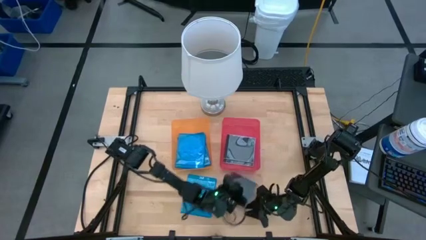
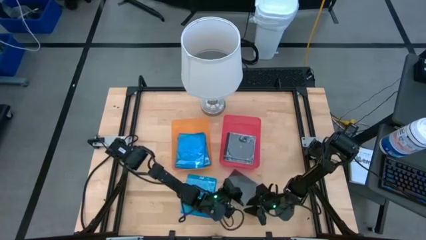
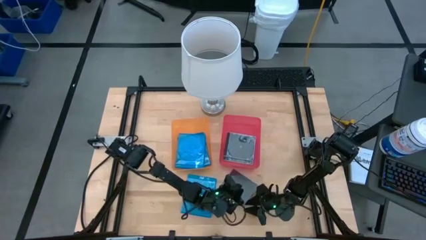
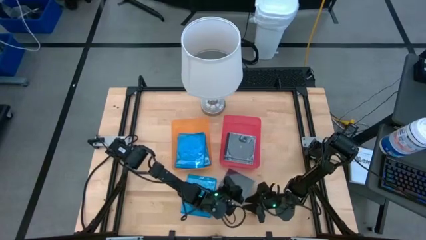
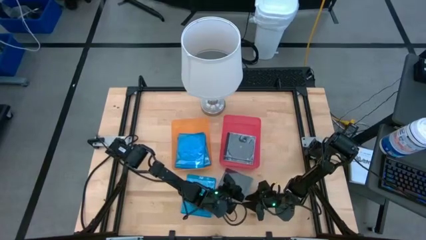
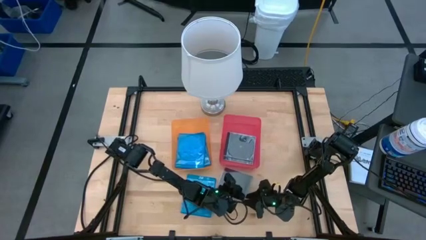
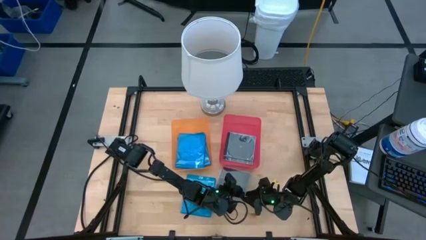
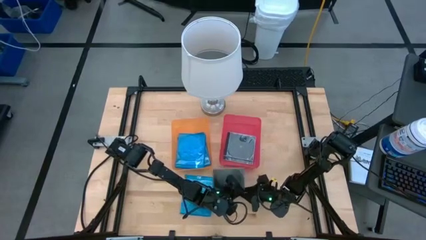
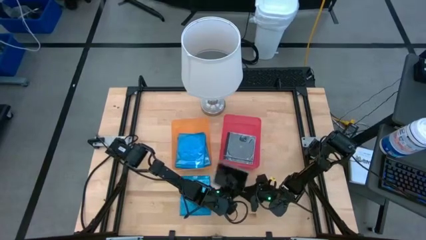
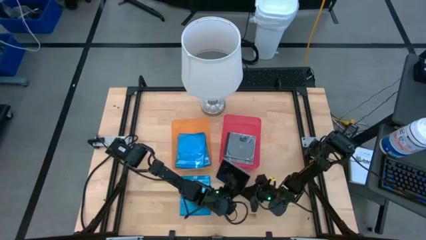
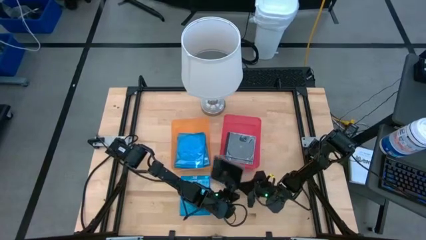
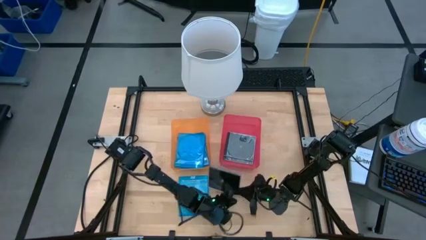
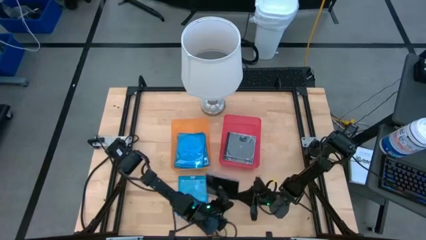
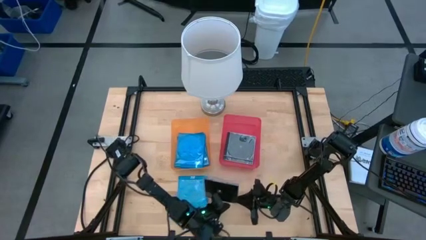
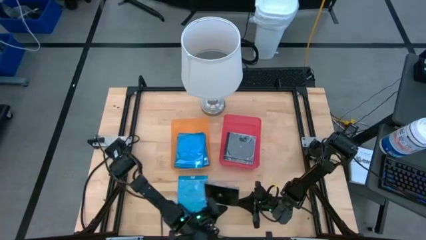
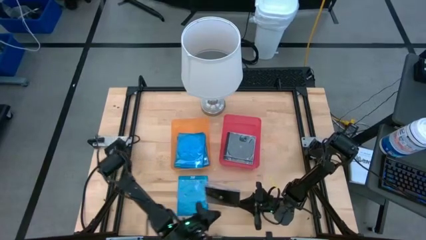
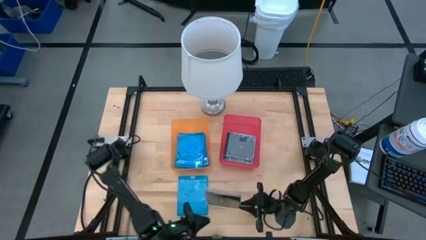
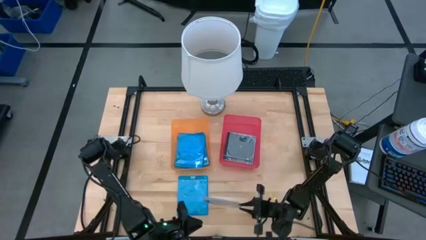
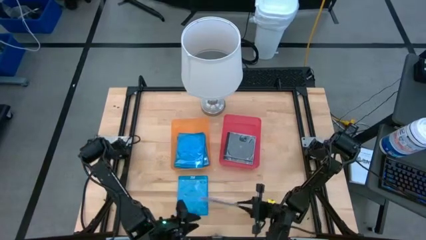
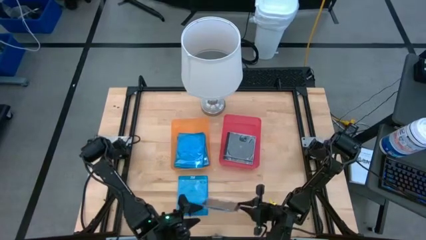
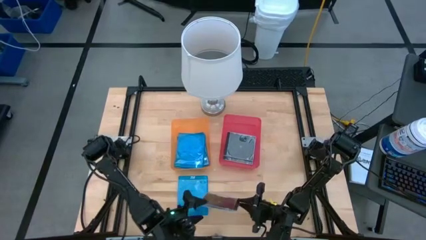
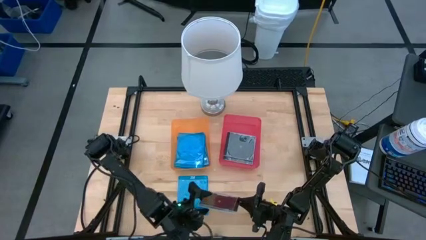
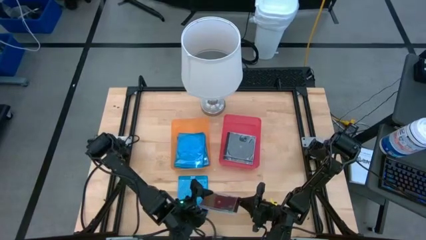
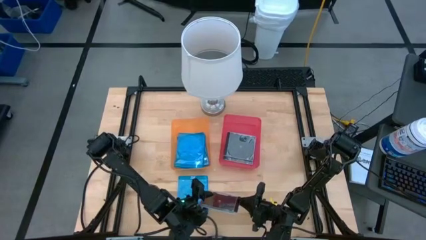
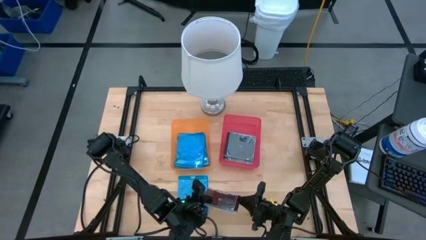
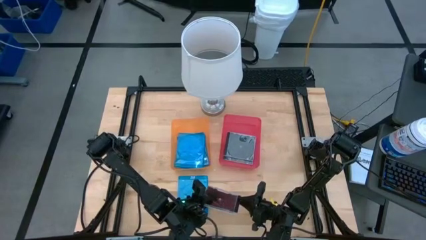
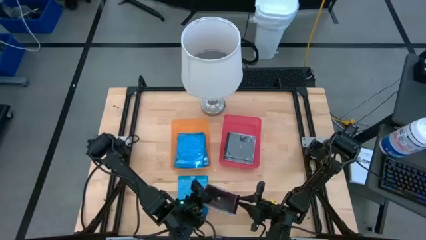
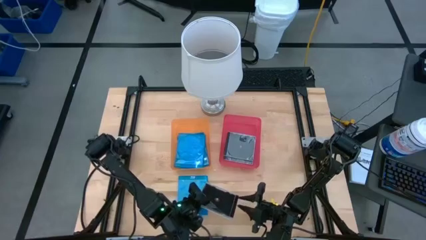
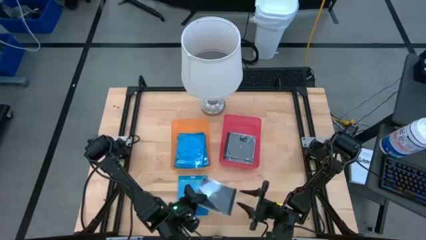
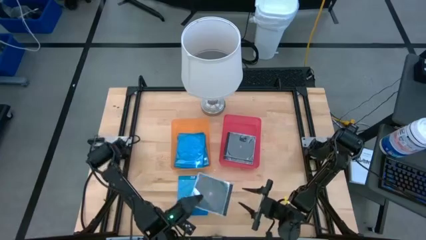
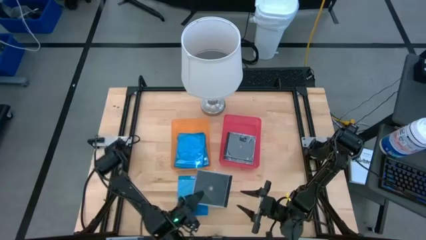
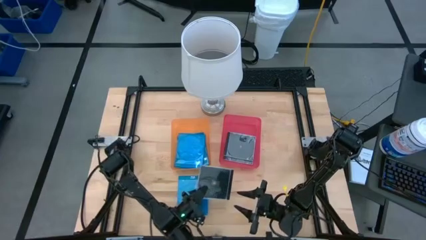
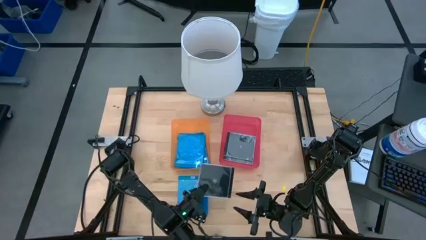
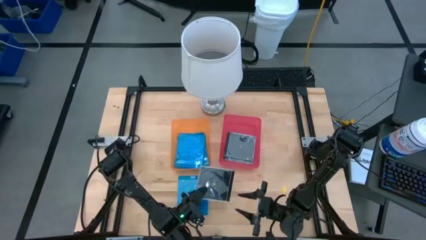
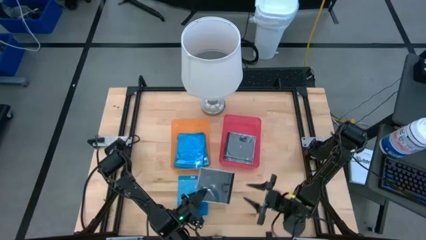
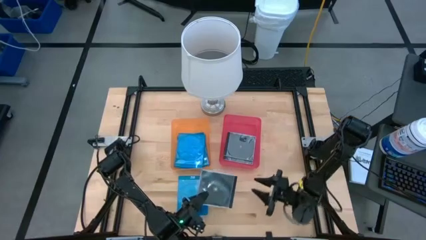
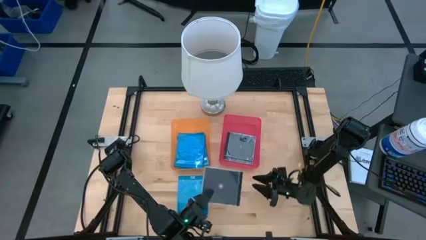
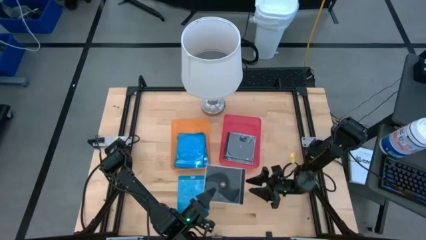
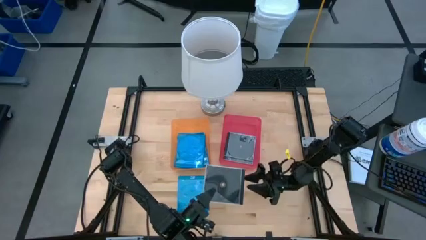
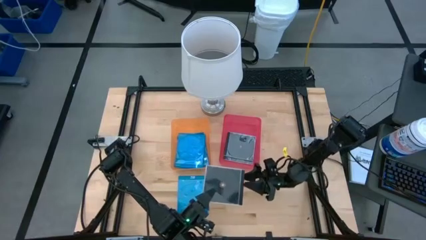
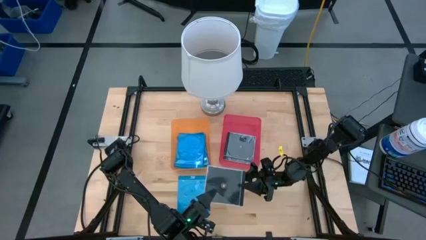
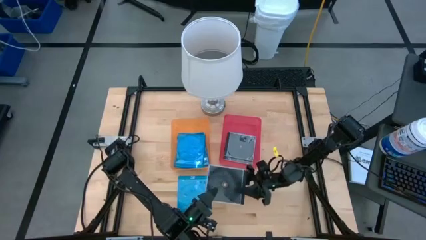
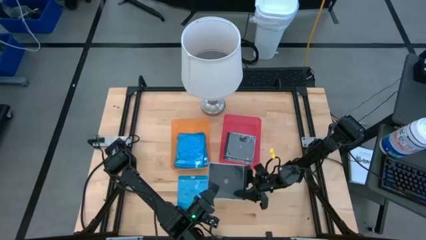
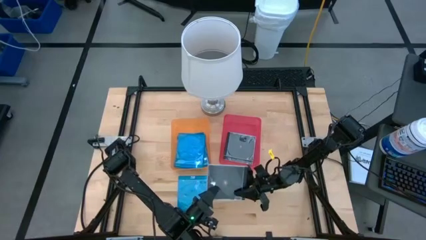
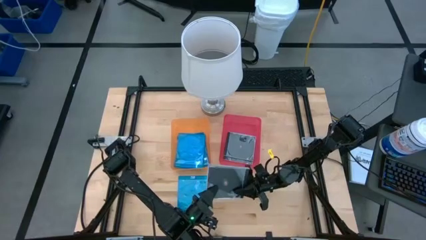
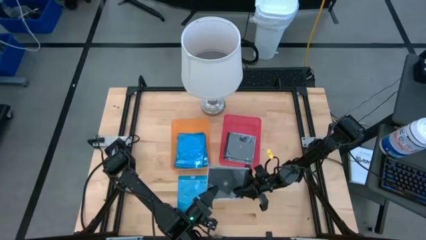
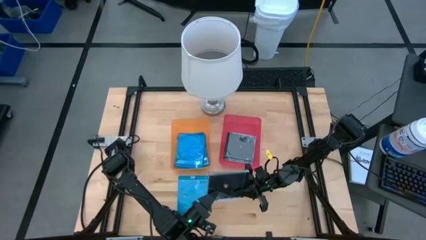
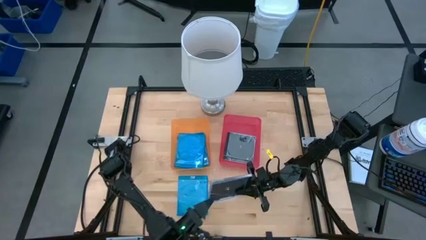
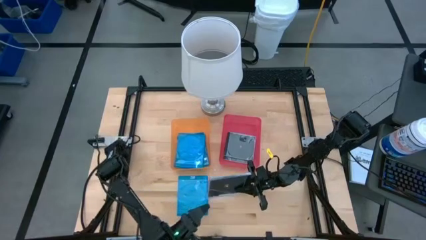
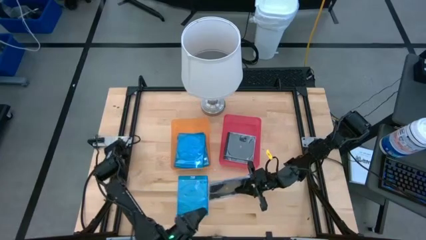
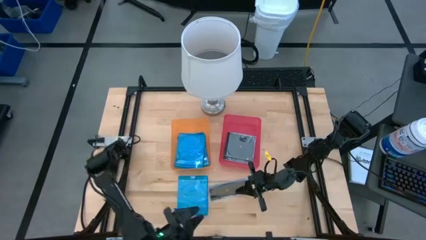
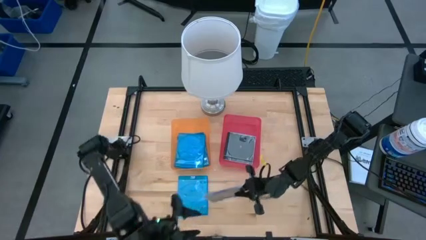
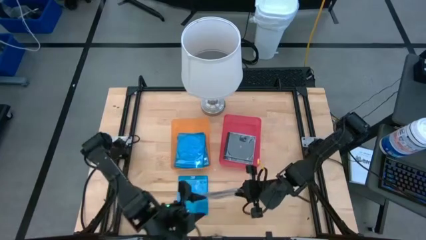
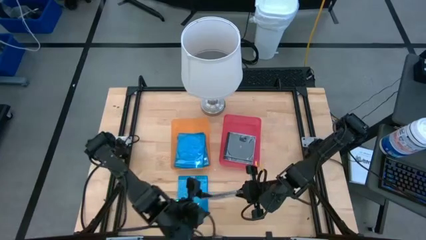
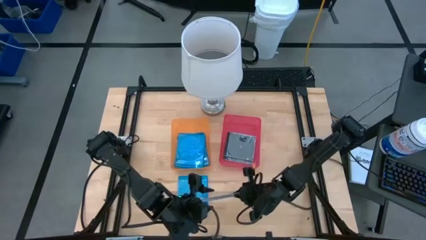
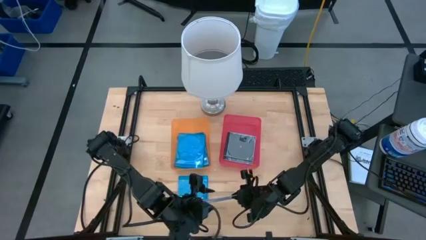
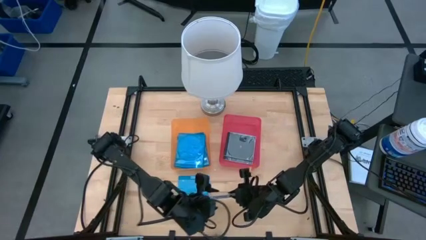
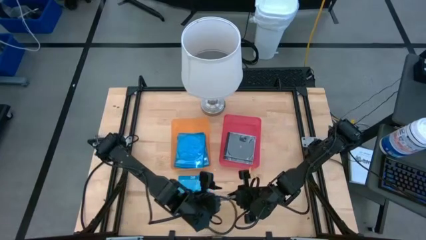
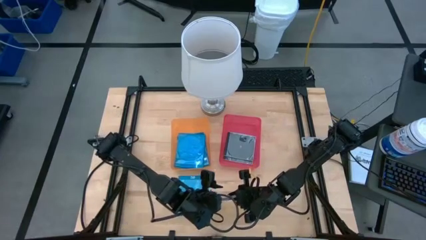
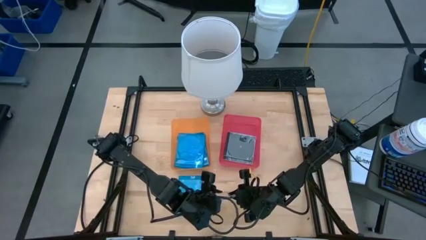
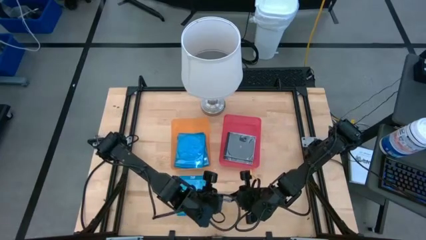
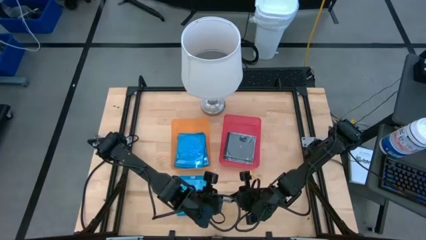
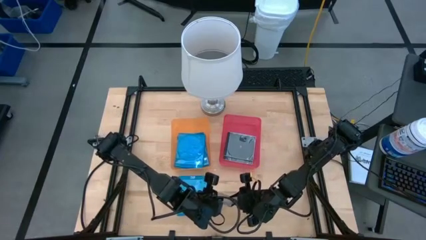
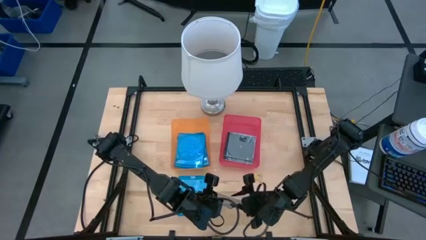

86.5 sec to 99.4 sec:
Task: Pick & place jewel cases by type
Put the black CD case into the red bin
